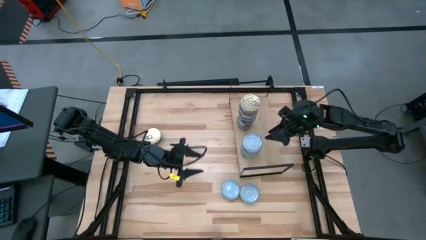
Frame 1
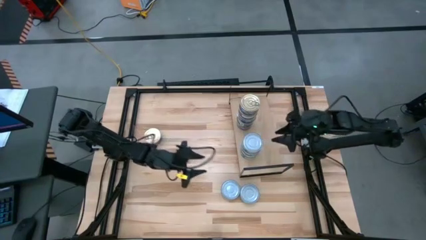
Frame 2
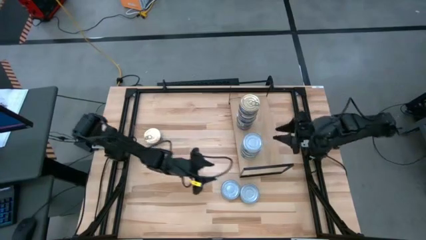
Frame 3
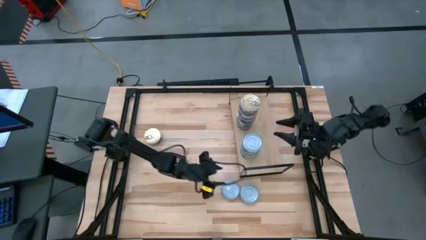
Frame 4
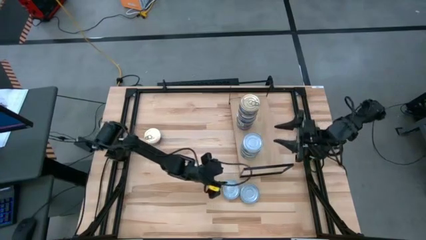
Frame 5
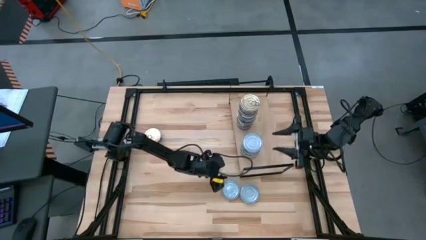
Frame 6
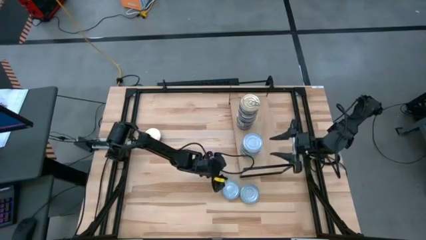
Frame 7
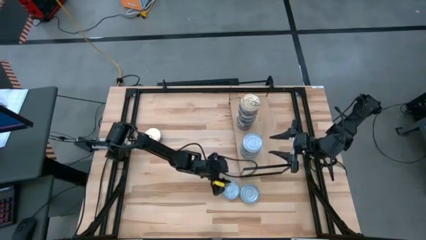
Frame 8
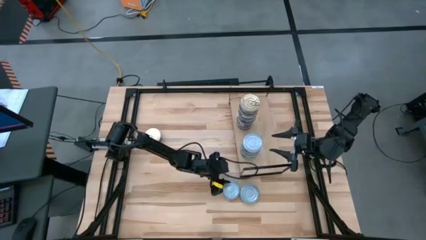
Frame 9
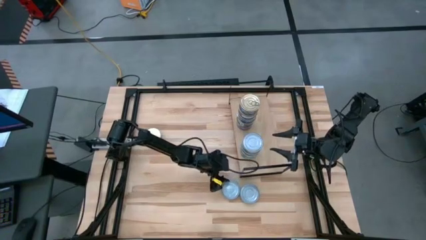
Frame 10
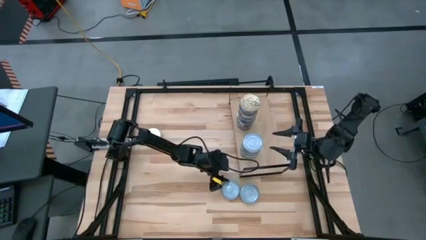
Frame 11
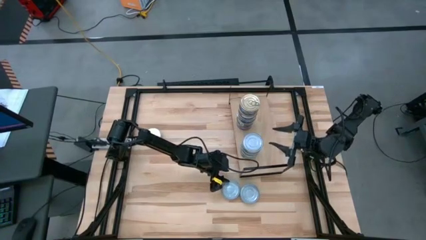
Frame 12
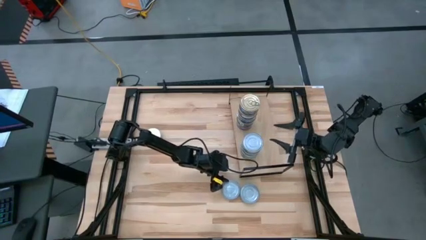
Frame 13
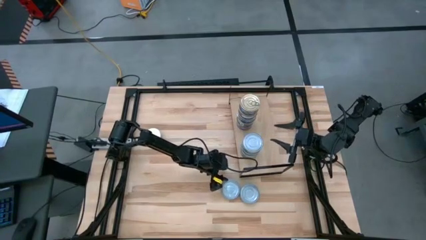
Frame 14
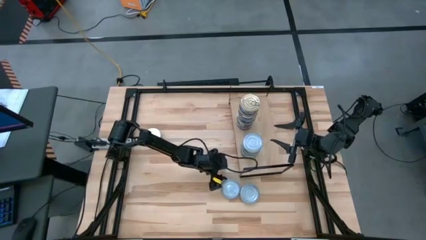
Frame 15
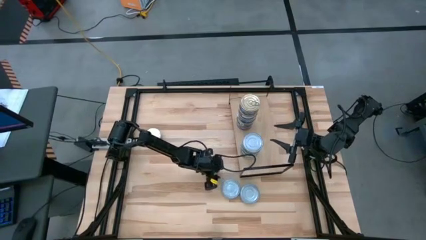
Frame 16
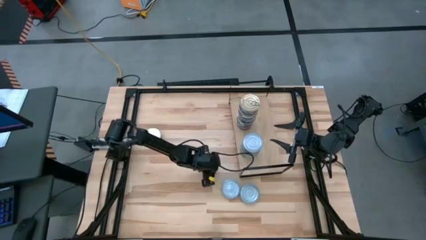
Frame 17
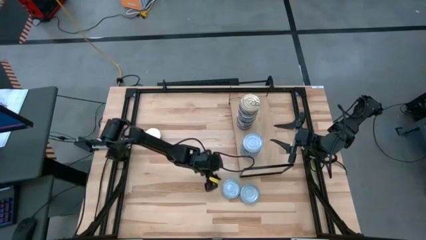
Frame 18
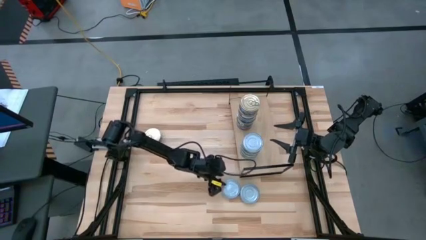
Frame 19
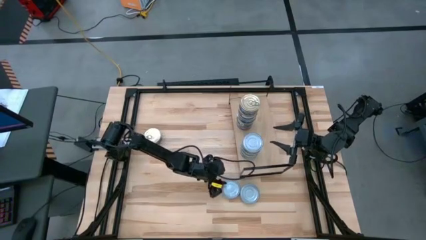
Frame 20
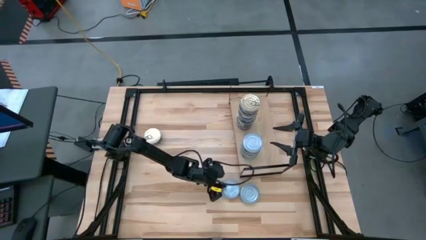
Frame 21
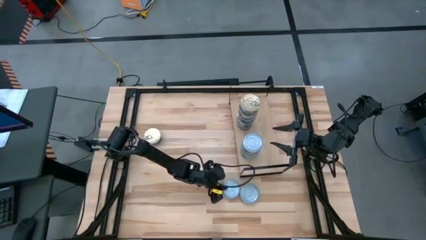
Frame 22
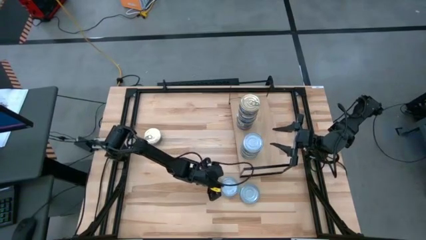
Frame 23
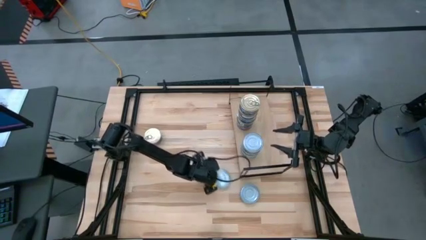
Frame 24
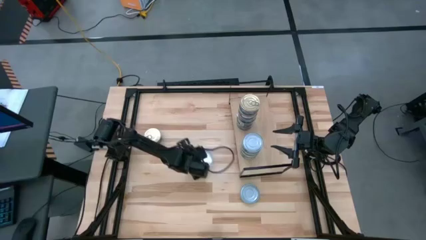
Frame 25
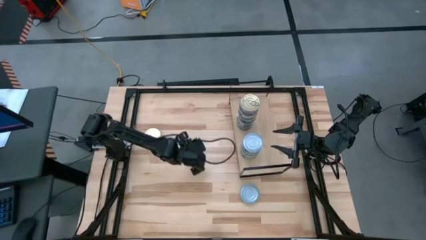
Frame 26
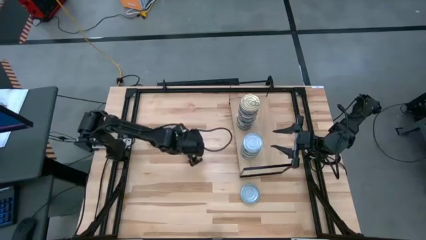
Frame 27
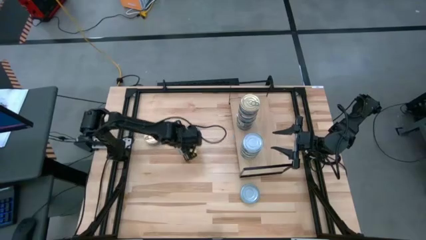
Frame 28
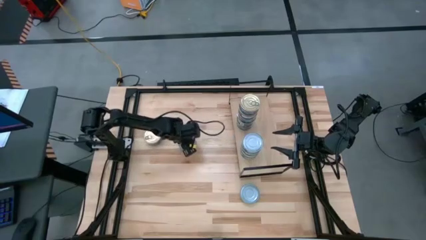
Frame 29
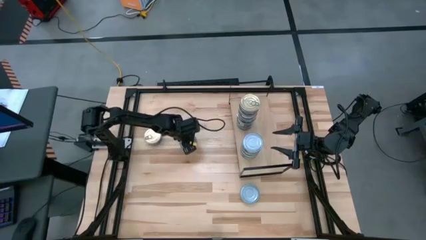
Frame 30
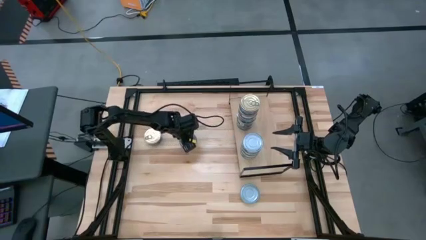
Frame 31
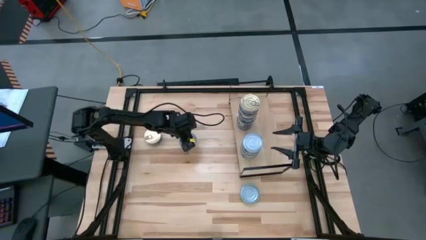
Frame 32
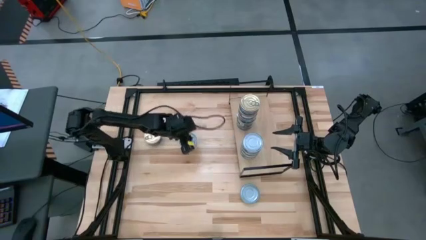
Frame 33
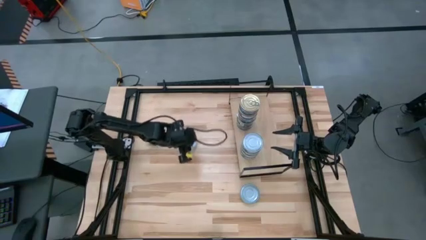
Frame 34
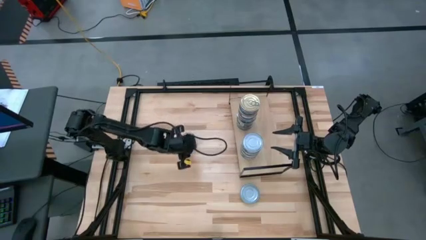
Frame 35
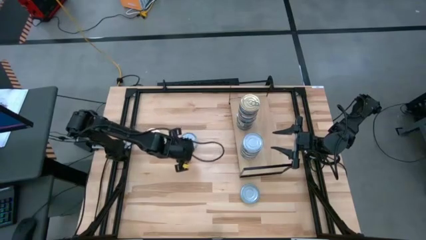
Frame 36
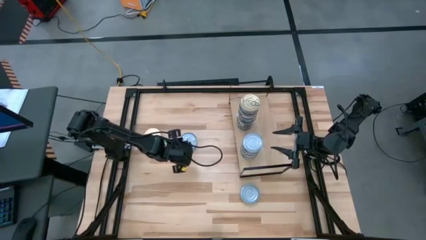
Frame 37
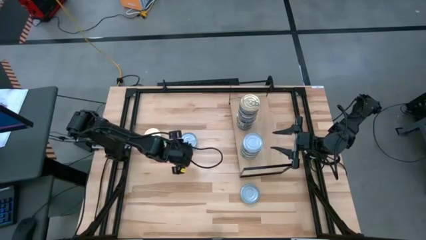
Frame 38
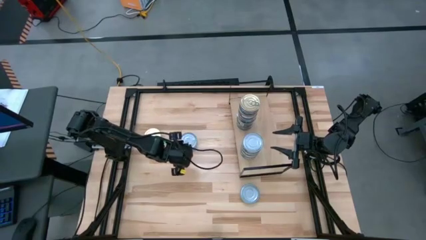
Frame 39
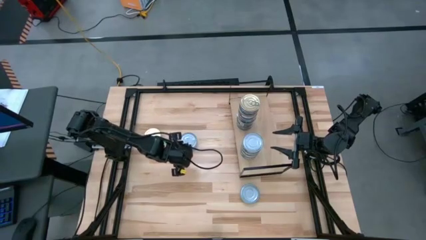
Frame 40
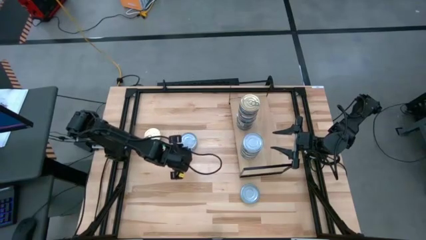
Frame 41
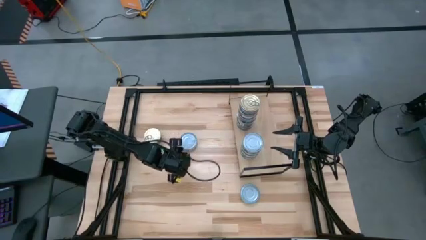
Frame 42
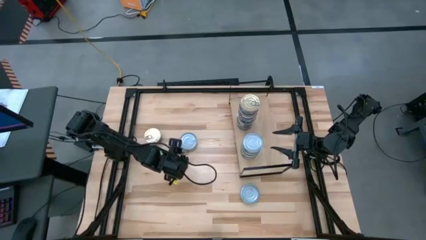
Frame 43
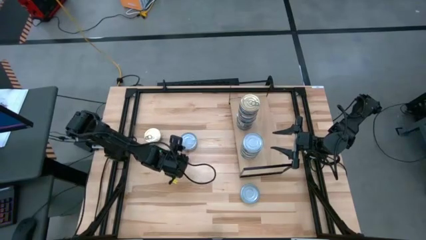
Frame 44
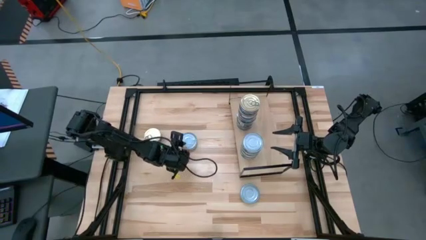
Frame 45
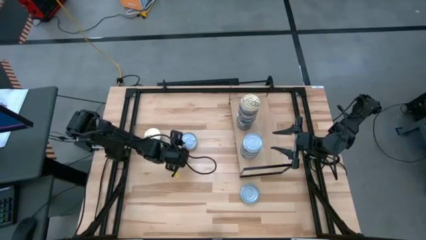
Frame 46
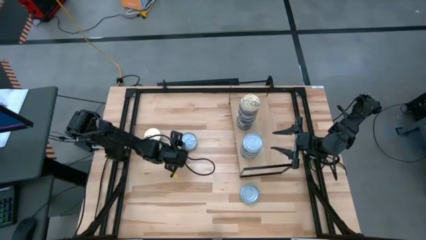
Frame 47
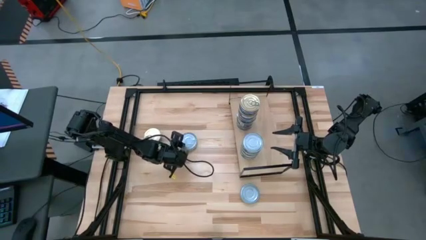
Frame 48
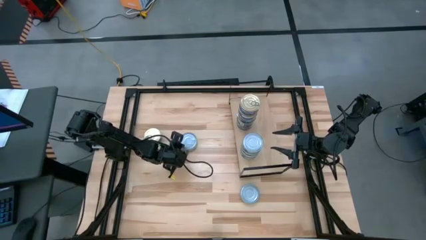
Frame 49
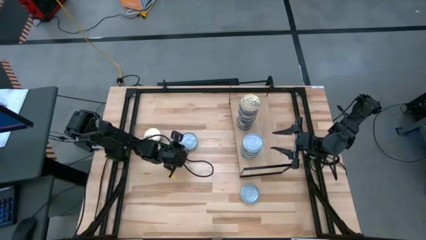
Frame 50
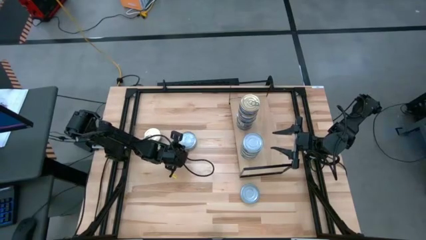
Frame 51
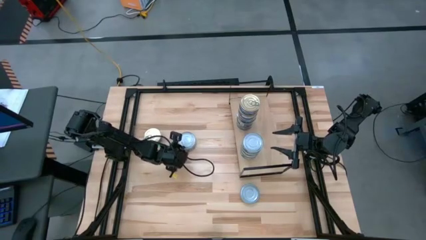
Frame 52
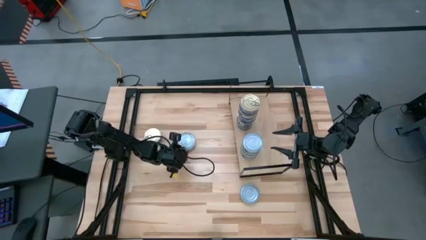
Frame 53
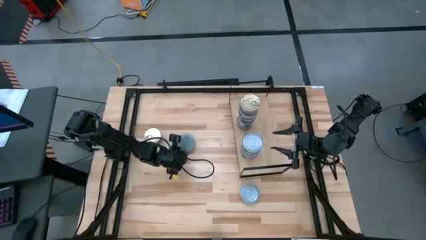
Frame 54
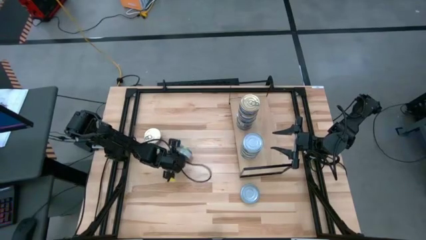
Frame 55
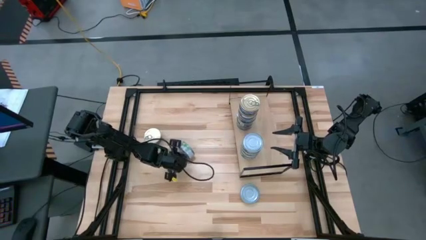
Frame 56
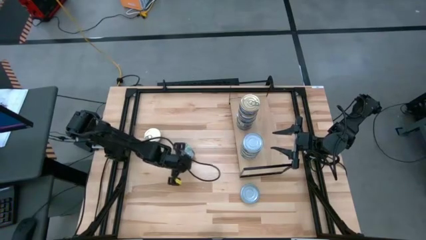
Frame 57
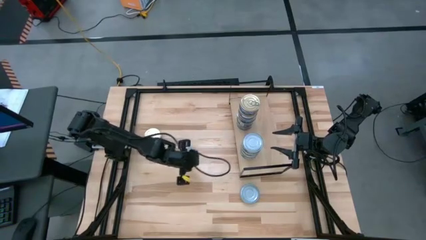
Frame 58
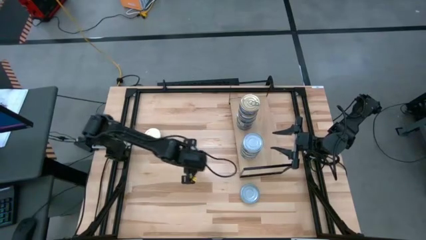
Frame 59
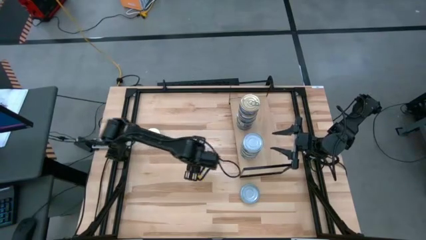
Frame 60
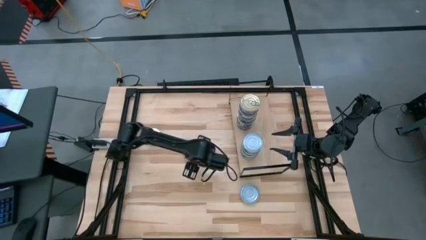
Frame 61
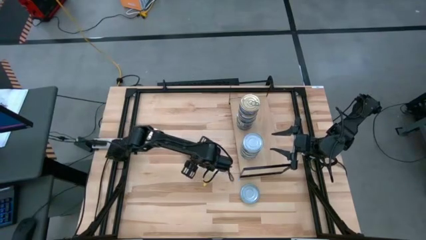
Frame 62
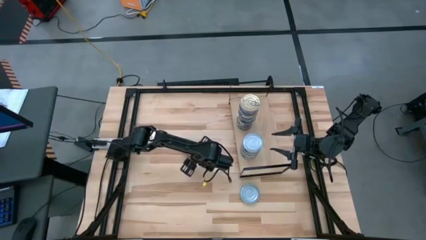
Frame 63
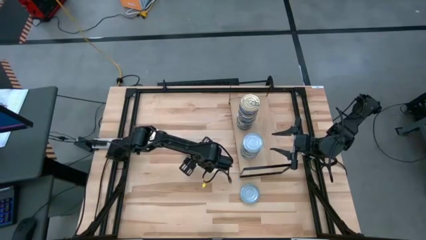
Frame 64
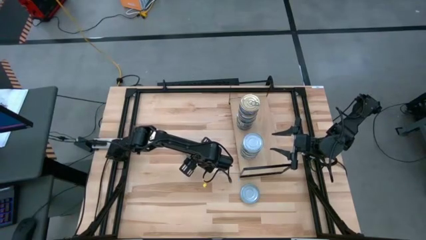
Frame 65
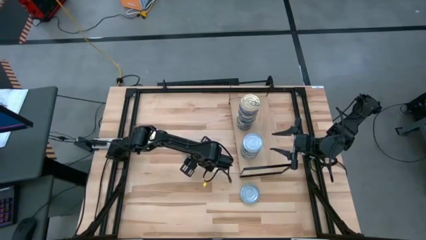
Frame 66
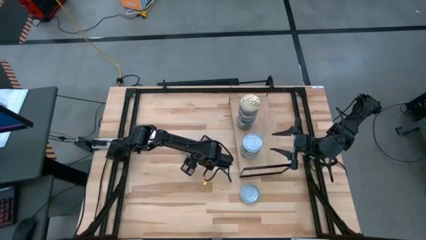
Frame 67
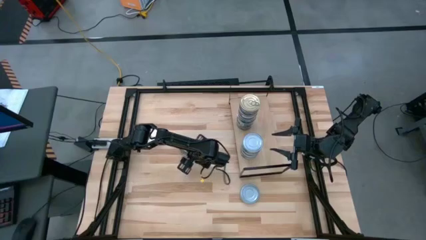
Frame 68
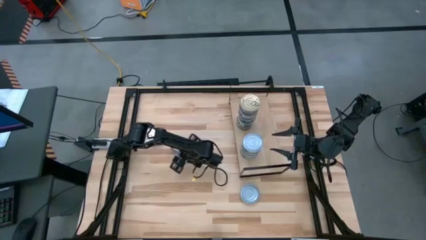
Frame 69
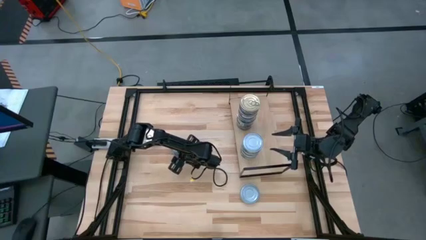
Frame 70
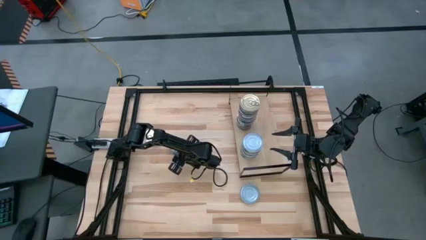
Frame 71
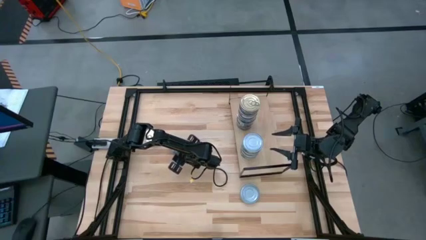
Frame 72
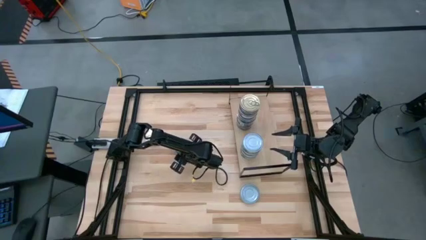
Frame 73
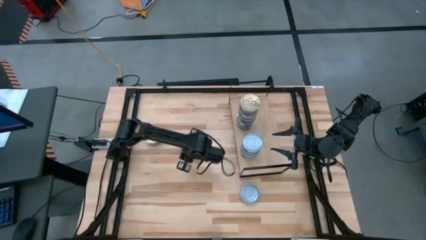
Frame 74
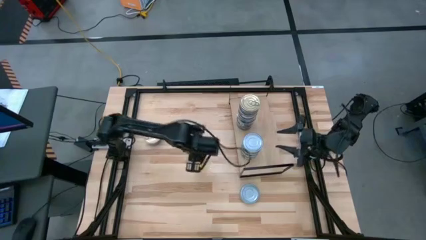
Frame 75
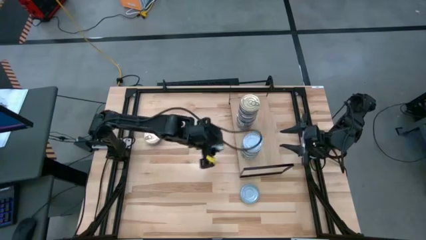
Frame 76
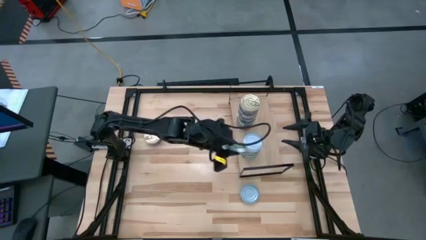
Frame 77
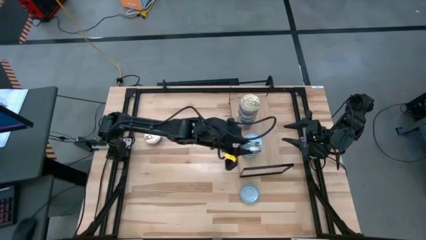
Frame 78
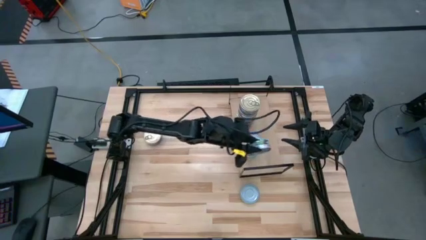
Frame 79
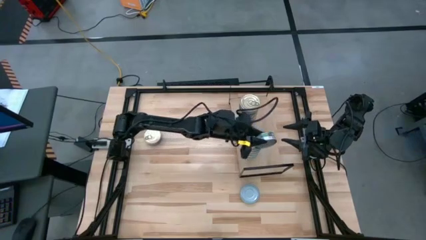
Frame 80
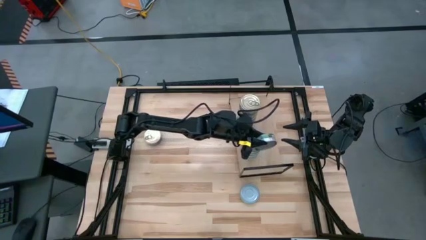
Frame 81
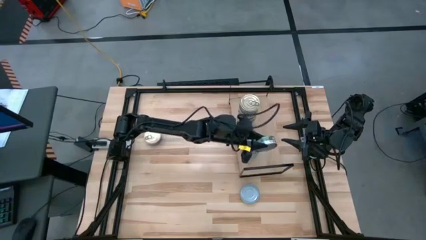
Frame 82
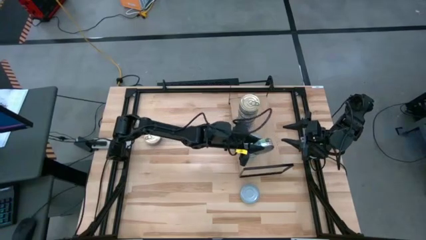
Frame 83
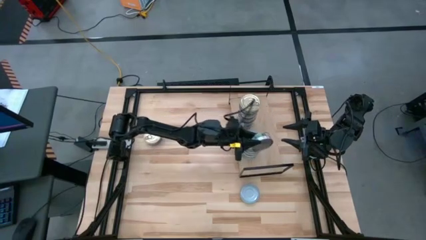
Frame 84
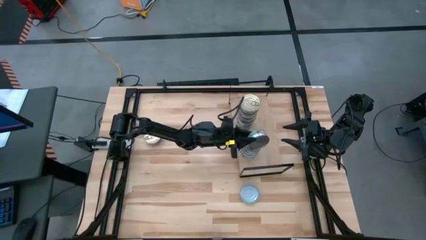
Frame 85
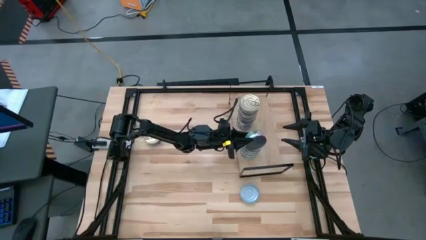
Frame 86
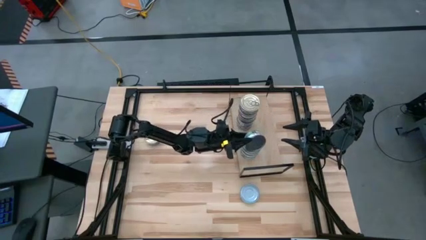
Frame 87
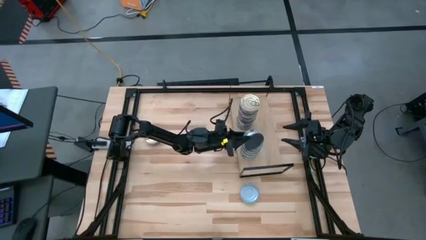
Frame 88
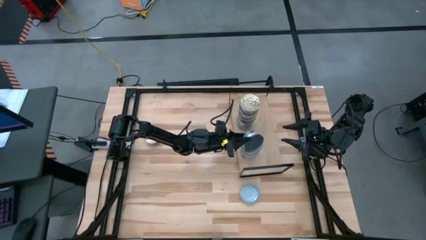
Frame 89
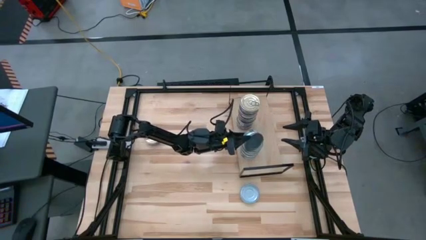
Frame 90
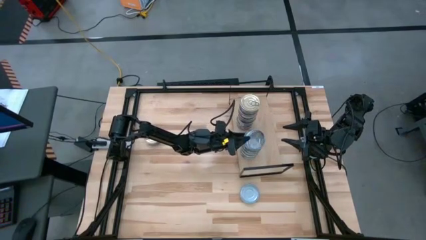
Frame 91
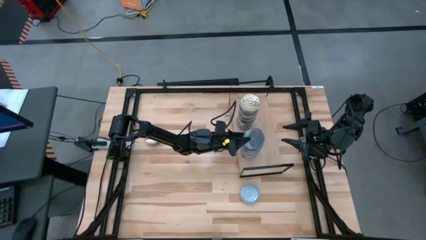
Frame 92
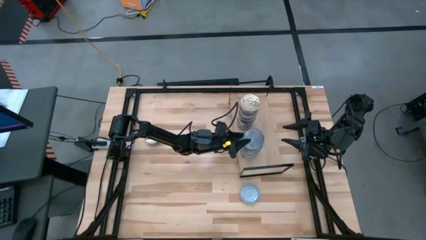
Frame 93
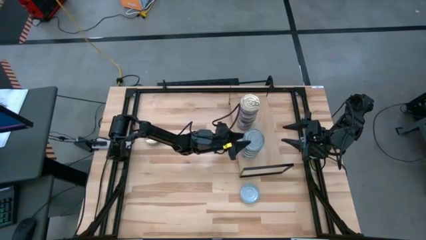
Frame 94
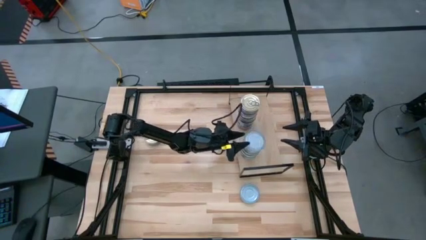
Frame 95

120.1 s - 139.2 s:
Task: Stack canned seafood by type on shelf
Stack the green tuna can on top of the other green tuna can on the shelf
